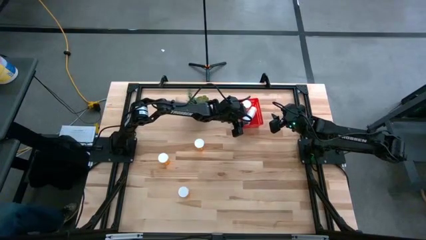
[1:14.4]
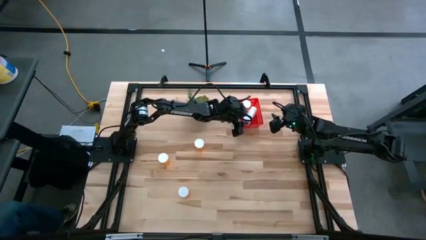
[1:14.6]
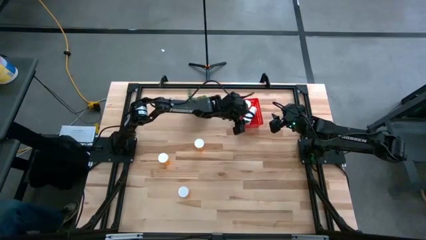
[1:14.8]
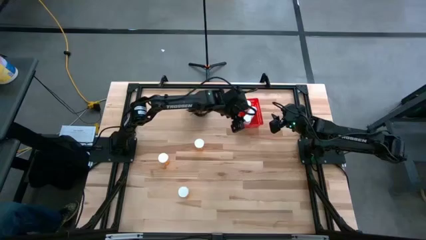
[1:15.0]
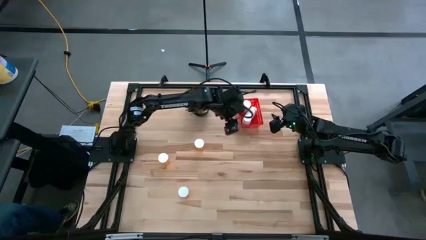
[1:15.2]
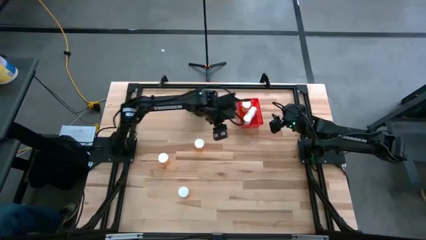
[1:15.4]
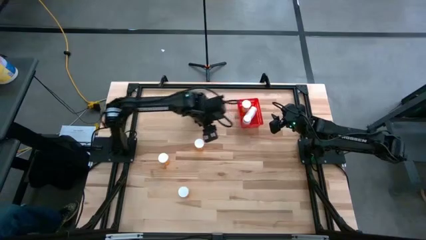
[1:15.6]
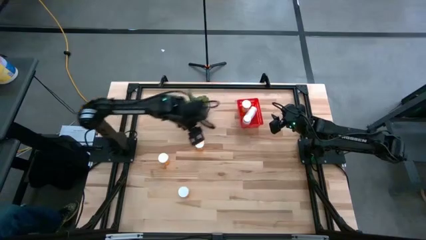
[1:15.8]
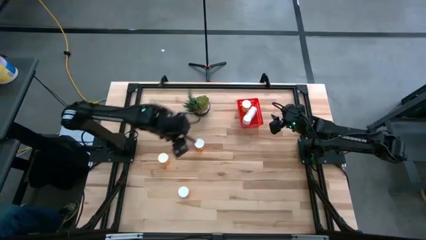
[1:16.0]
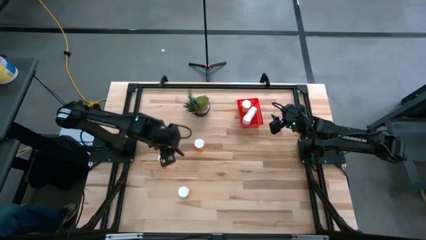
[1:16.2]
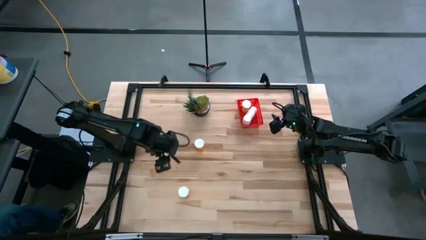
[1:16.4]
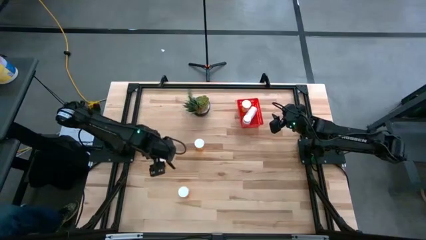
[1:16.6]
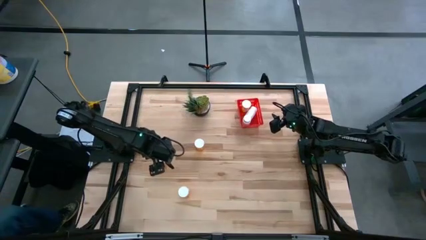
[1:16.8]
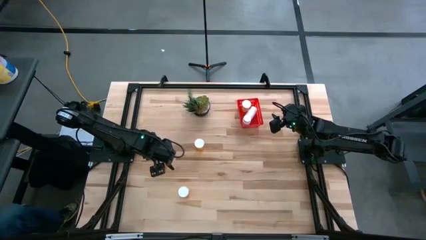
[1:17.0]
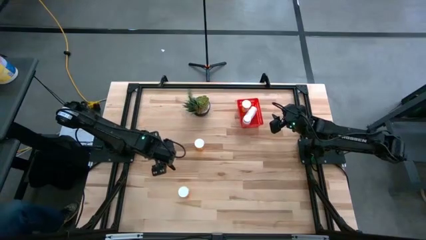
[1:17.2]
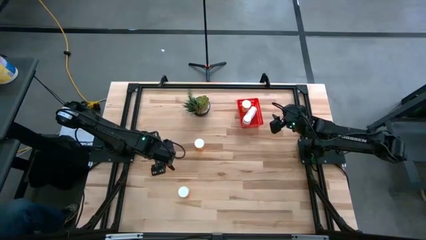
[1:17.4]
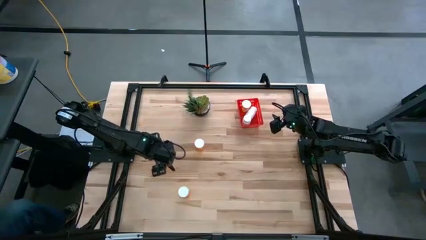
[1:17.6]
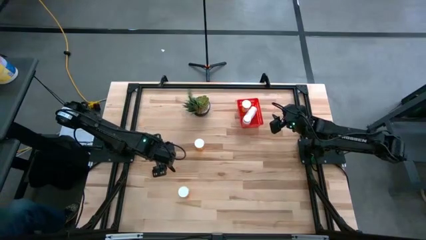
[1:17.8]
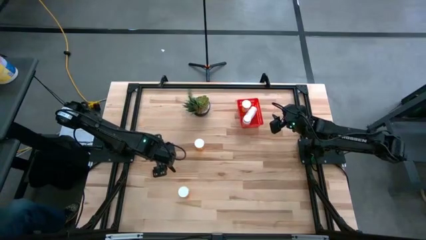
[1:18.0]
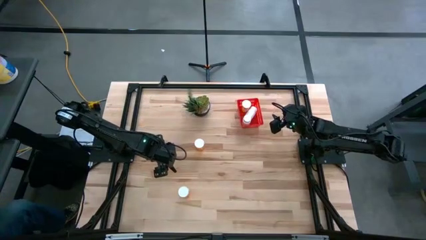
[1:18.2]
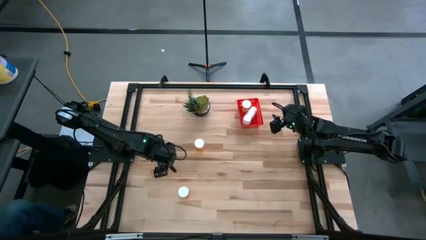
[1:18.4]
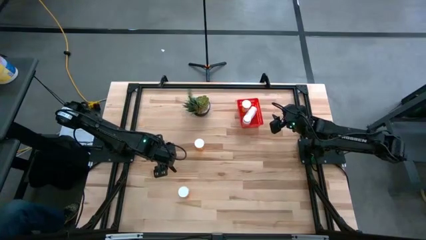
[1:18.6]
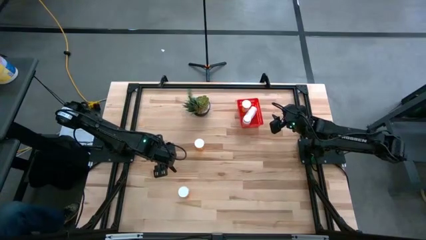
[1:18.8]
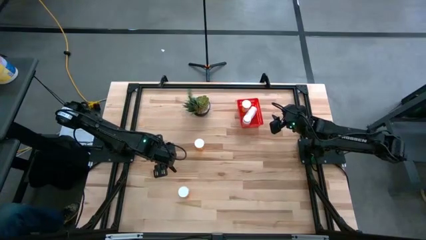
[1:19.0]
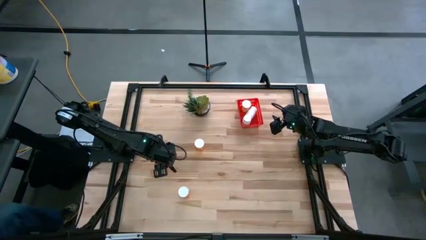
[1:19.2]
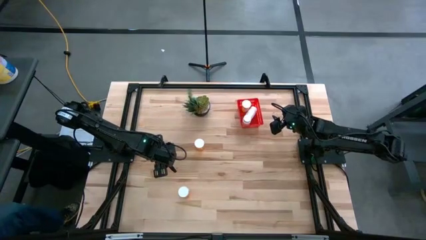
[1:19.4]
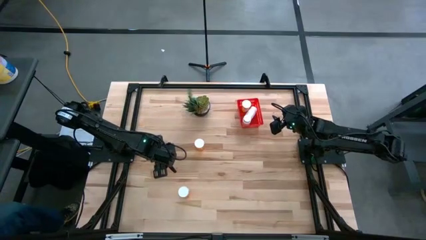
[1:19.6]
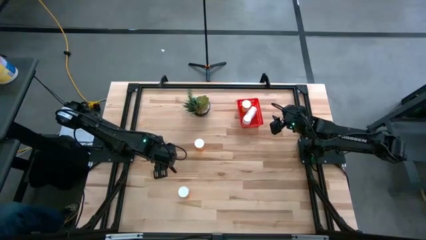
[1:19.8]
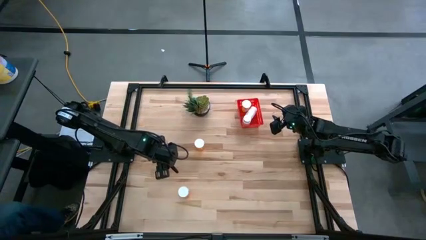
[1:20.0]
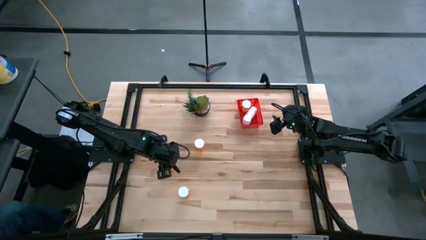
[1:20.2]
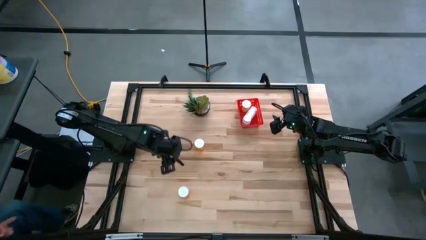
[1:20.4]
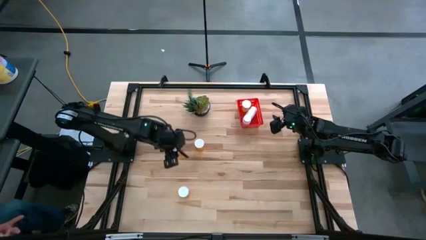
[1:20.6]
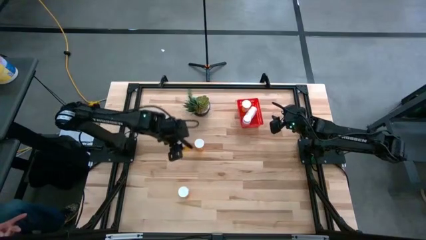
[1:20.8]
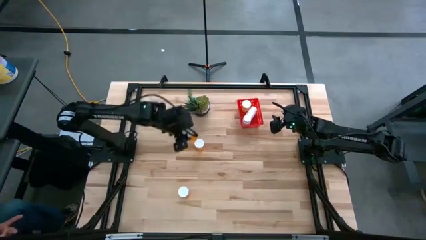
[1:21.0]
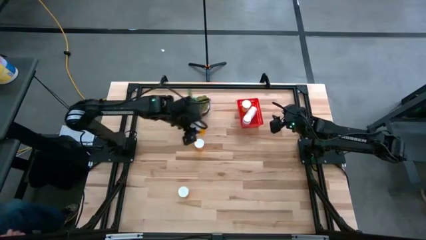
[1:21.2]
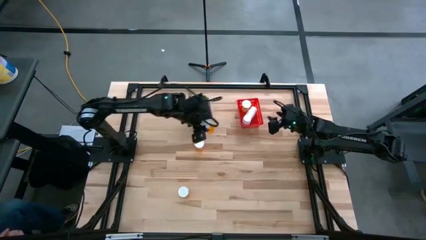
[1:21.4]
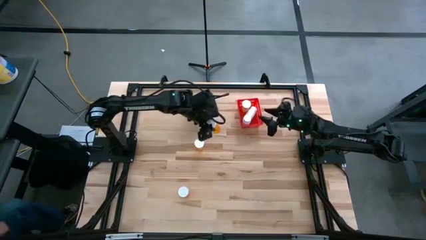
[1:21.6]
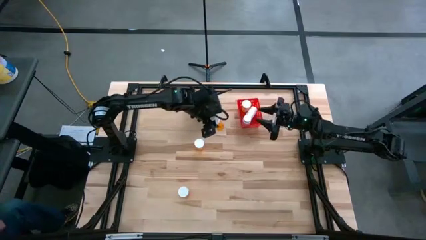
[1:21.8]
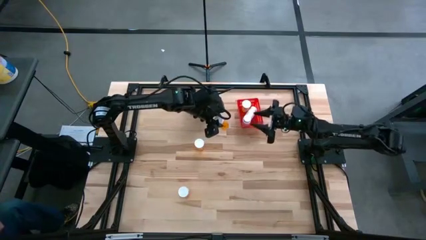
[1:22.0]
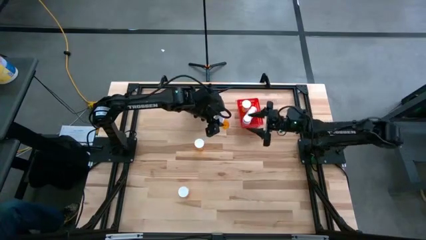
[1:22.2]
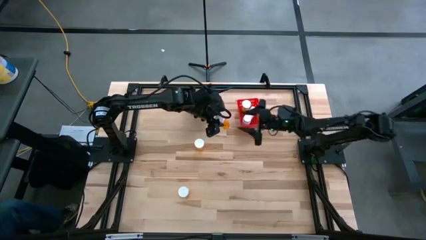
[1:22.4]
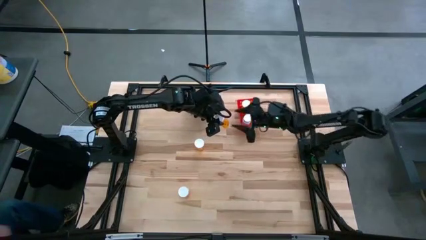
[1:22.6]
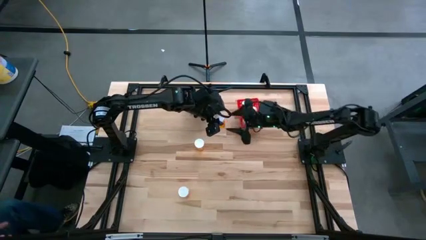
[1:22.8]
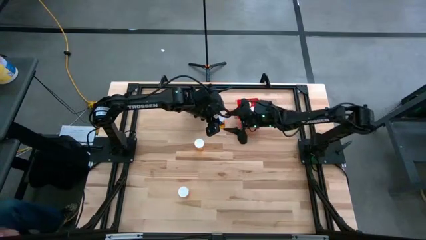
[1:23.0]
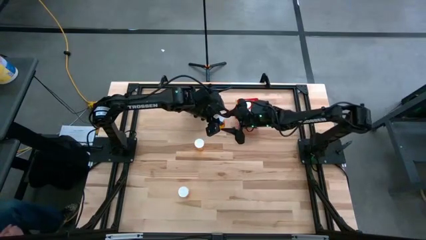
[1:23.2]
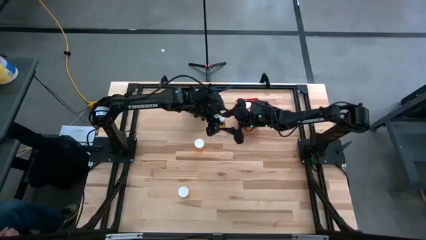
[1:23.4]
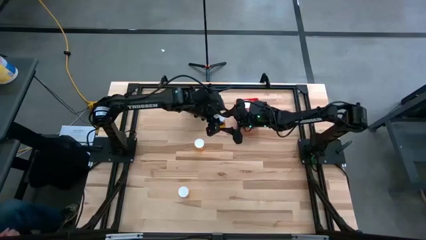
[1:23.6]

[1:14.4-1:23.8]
Task: Pick and place pill bottles into a basket
Put the middle left orange pill bottle into the bin

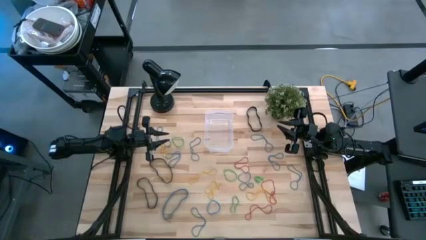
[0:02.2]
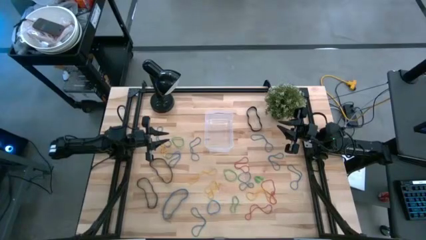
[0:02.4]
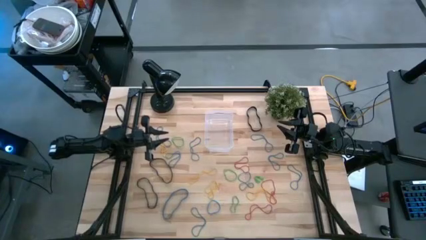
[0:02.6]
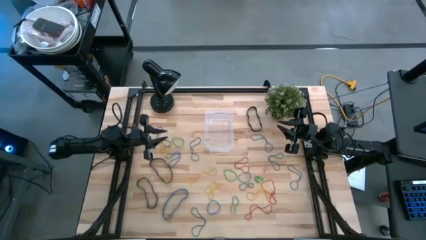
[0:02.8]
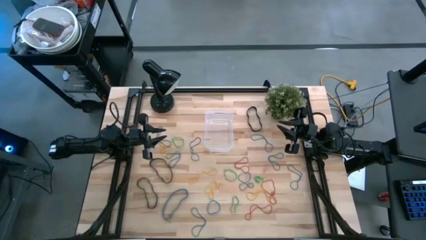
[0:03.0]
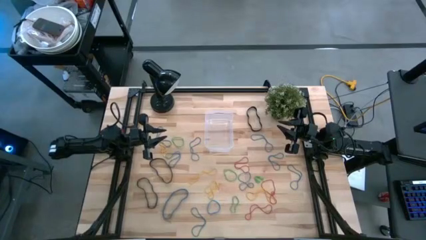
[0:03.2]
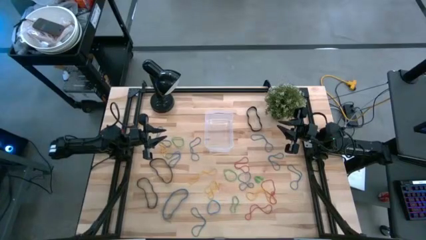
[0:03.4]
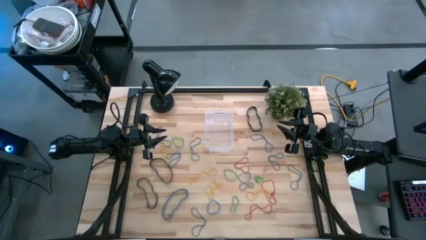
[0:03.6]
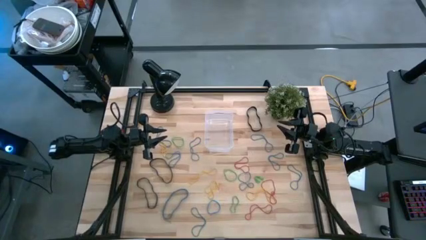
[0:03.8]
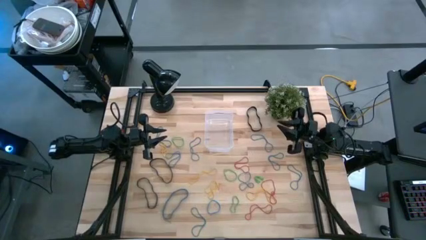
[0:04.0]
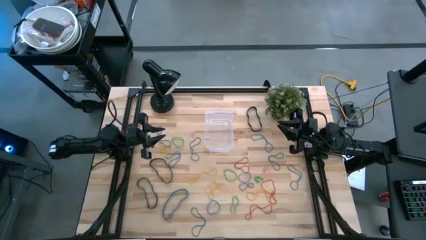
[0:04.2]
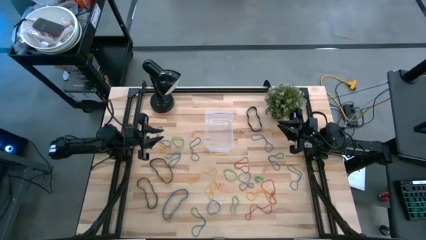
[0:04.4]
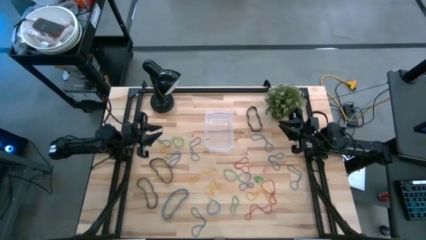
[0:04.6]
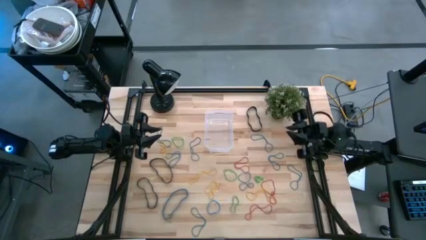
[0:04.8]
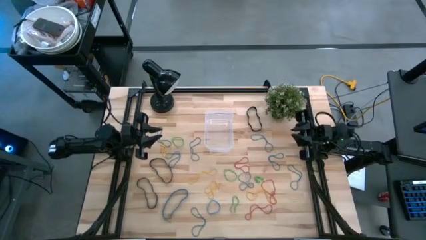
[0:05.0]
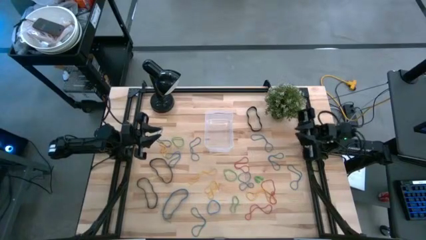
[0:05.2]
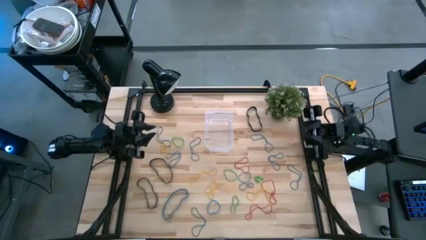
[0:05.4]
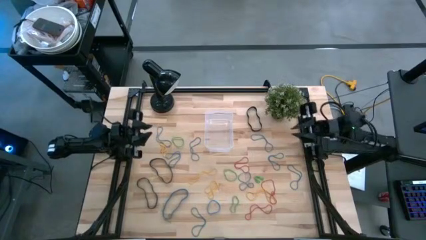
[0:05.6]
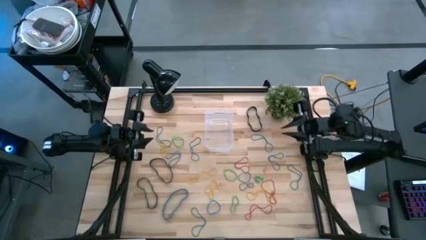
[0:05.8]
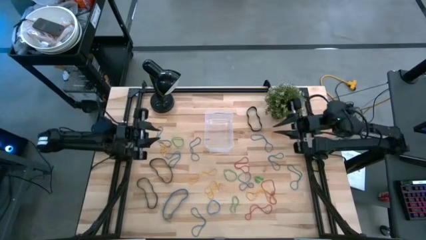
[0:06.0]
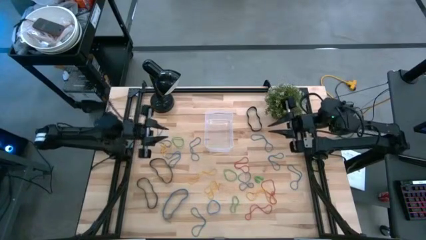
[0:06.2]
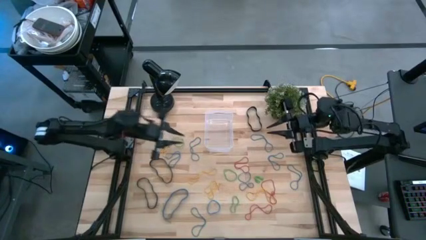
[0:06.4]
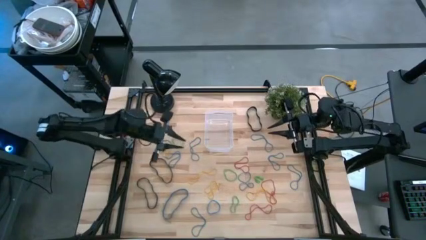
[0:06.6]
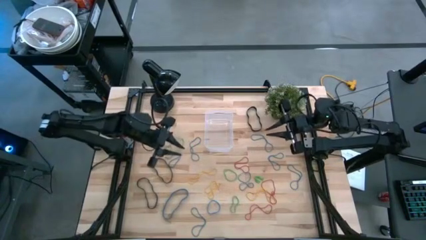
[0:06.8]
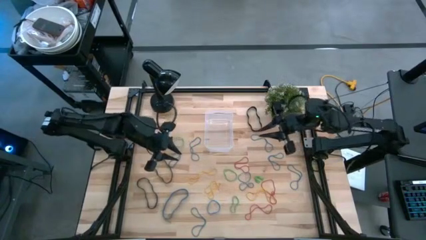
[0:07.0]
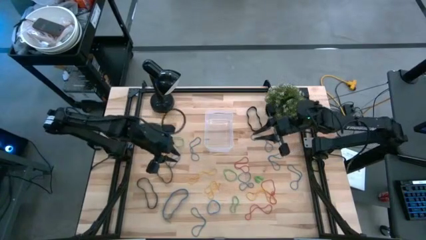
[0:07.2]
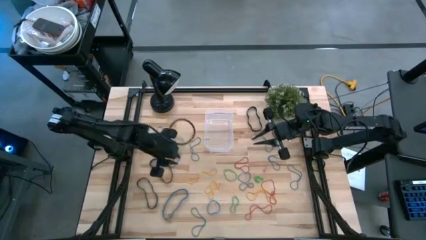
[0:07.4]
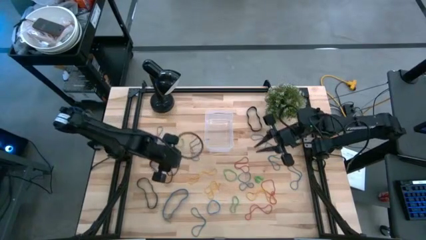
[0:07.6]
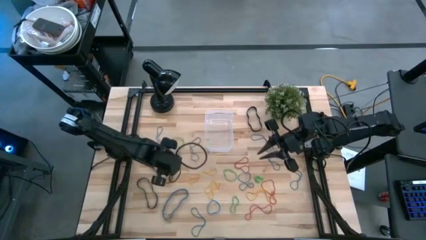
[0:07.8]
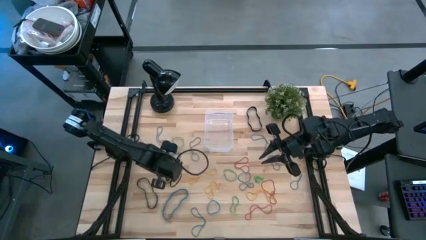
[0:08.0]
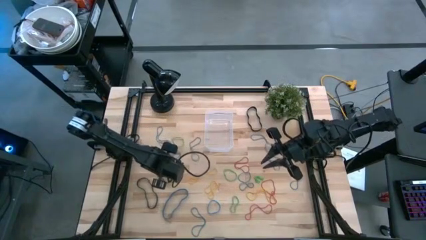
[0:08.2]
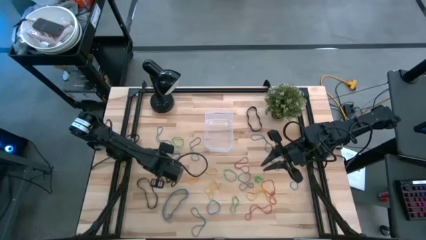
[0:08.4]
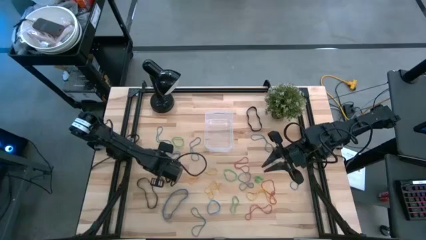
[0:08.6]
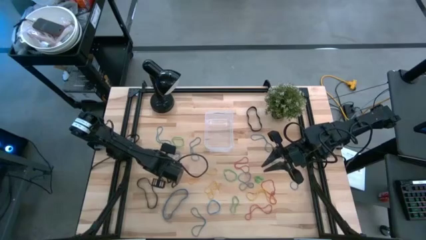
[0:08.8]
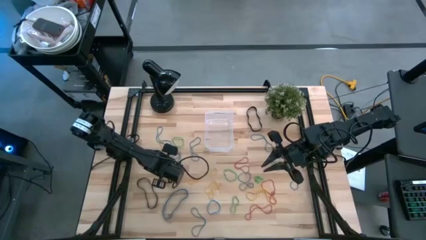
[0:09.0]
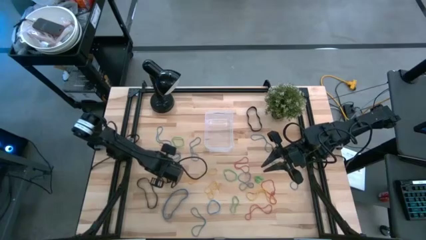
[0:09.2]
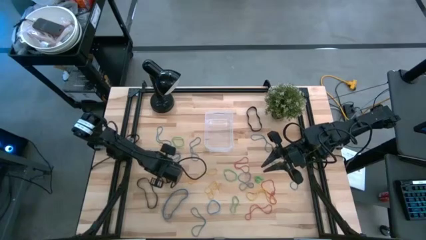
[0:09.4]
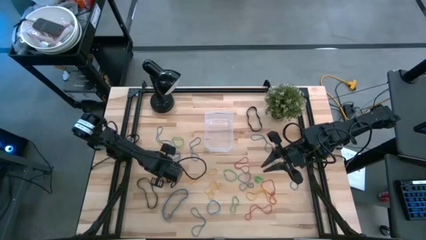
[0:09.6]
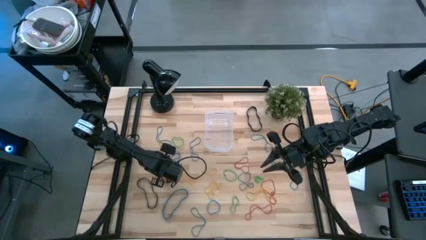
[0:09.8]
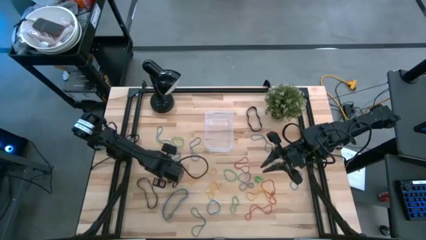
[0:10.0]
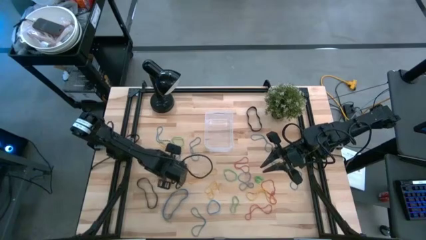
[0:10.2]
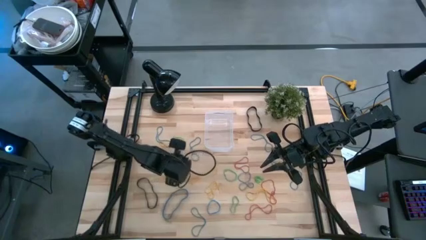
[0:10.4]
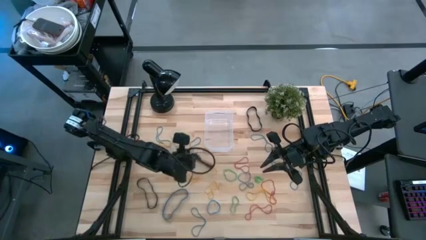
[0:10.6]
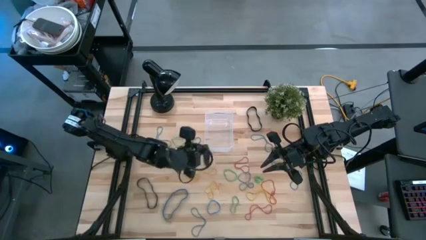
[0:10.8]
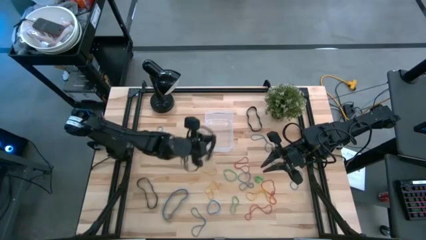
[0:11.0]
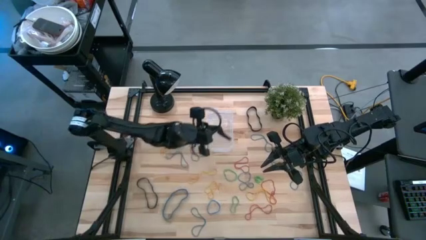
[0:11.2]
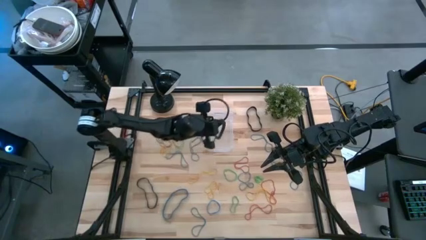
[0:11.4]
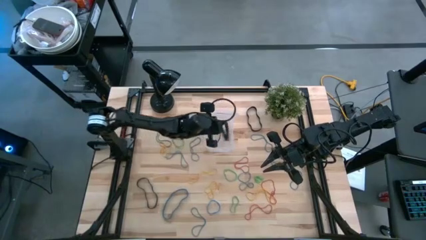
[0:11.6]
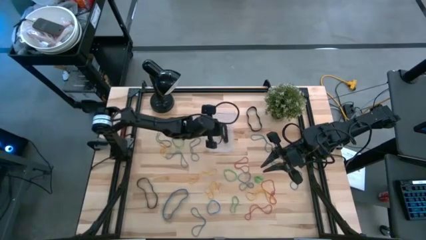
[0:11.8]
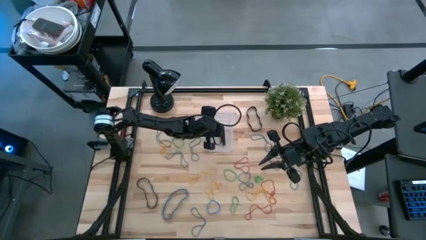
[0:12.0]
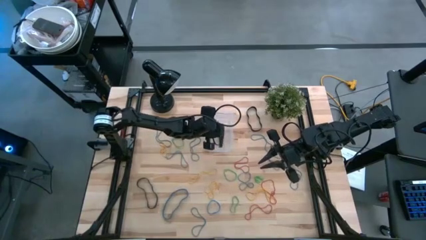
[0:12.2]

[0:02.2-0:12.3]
Task: Pick and place rubber bands into bin
Put black rubberband into the transparent bin
